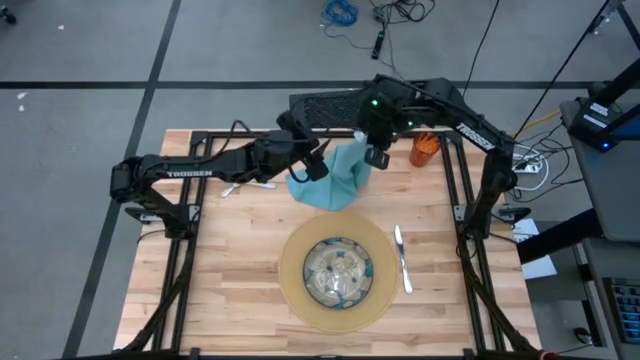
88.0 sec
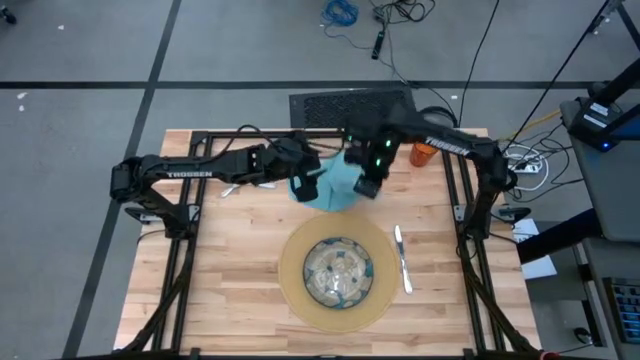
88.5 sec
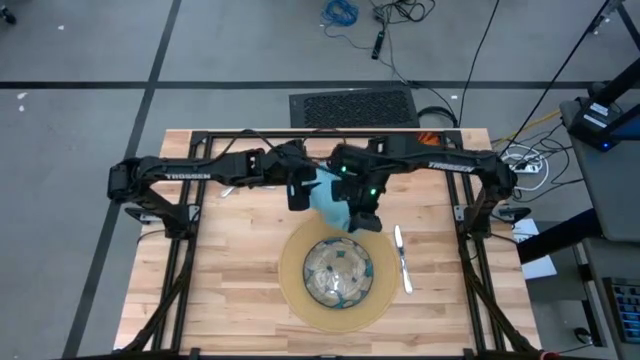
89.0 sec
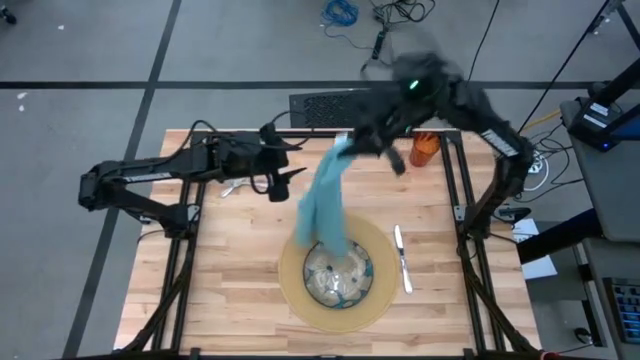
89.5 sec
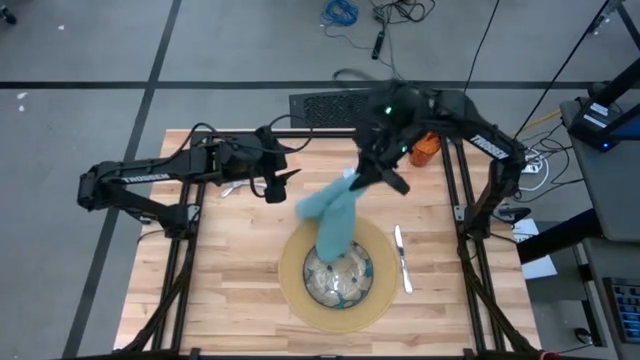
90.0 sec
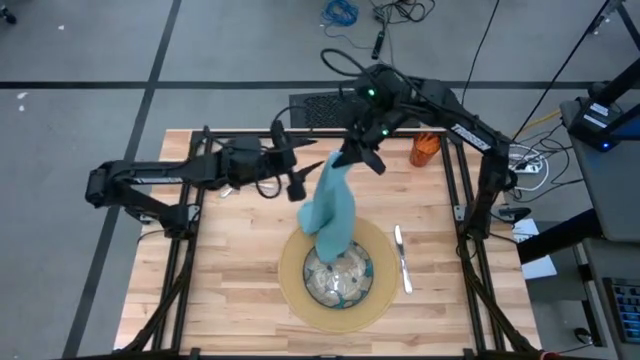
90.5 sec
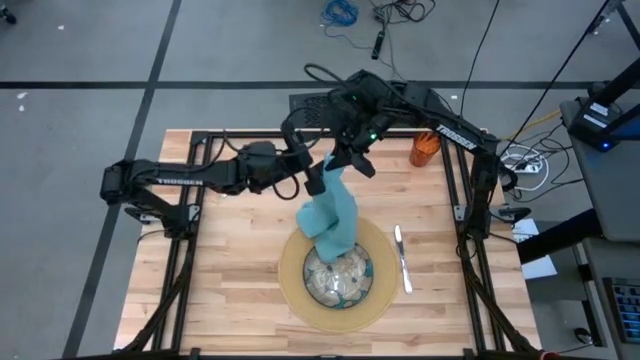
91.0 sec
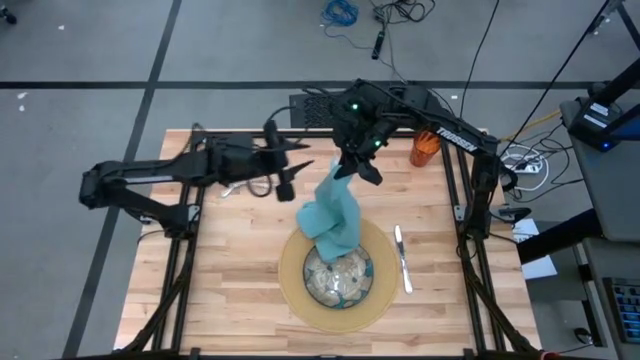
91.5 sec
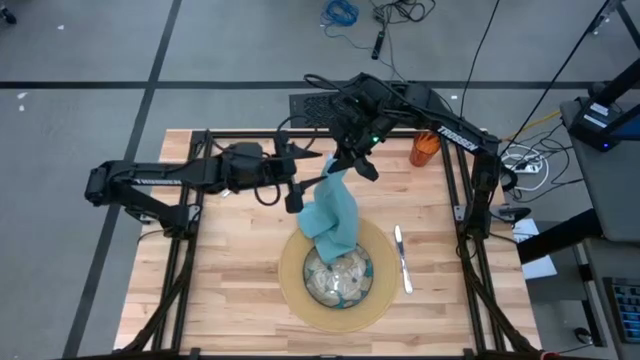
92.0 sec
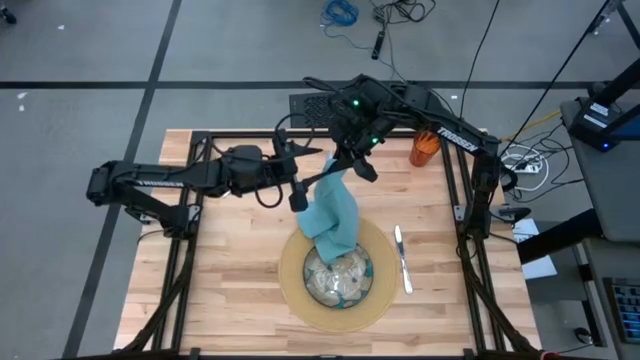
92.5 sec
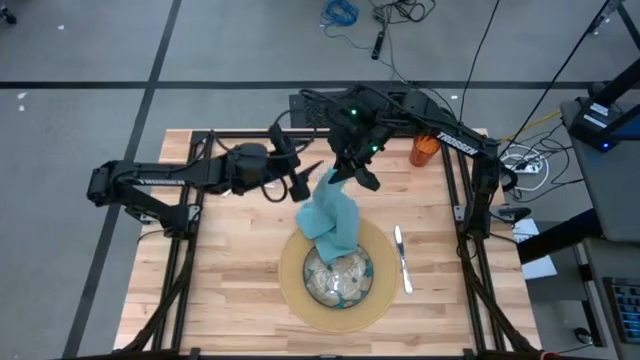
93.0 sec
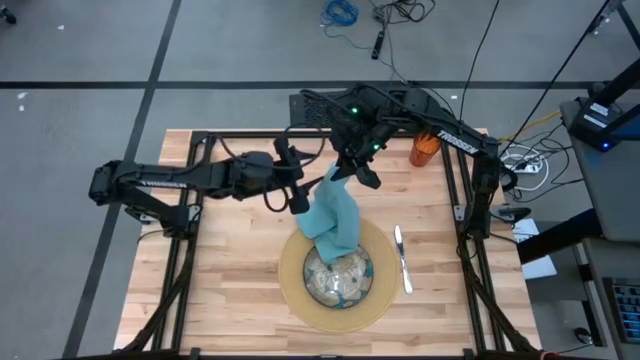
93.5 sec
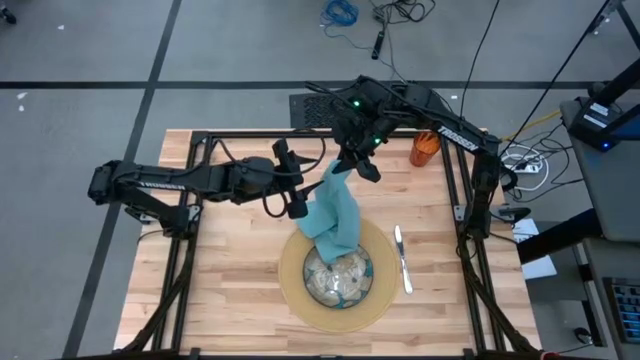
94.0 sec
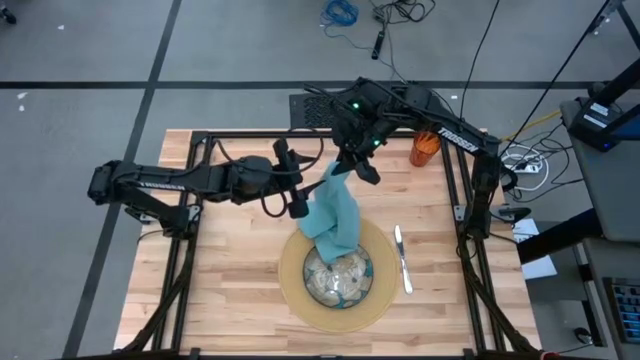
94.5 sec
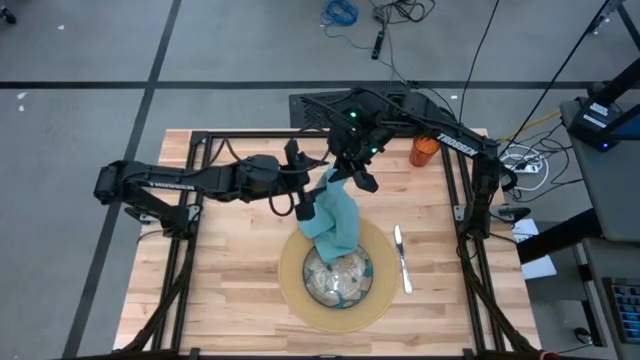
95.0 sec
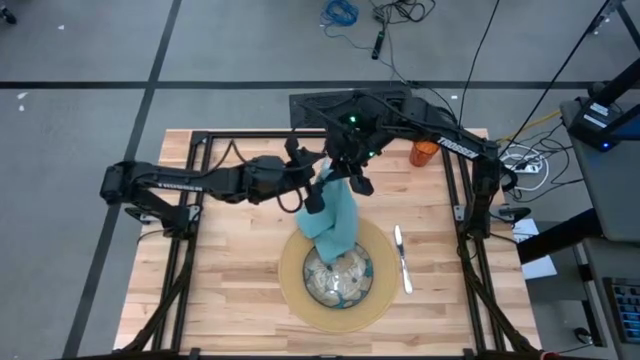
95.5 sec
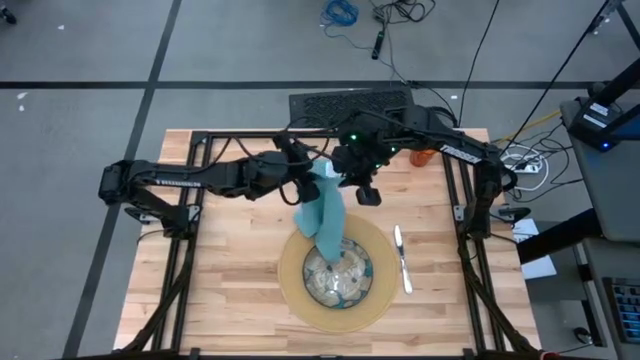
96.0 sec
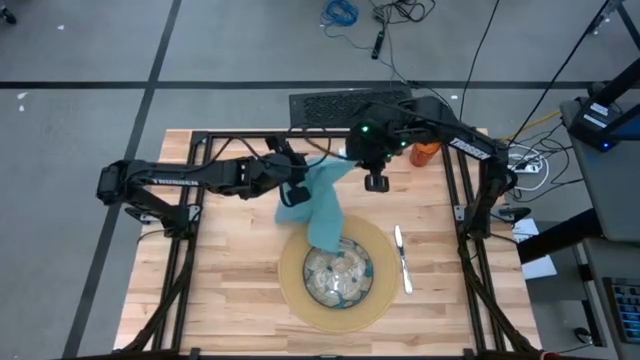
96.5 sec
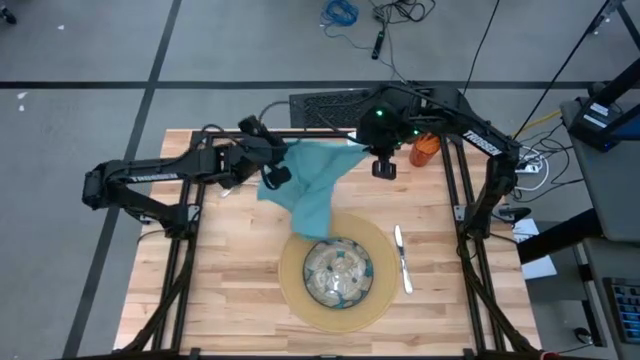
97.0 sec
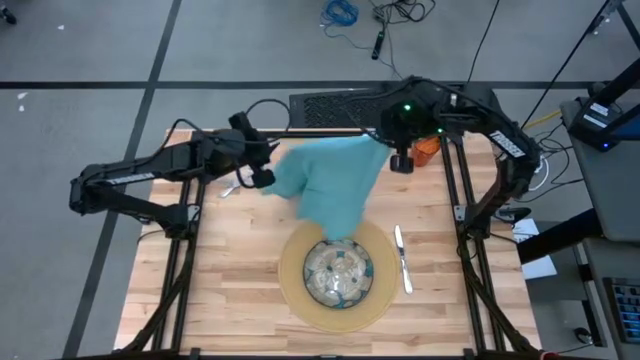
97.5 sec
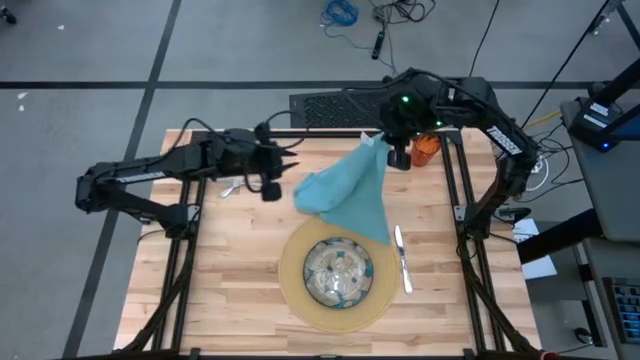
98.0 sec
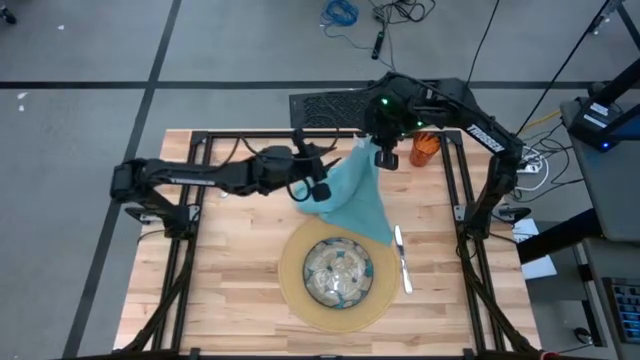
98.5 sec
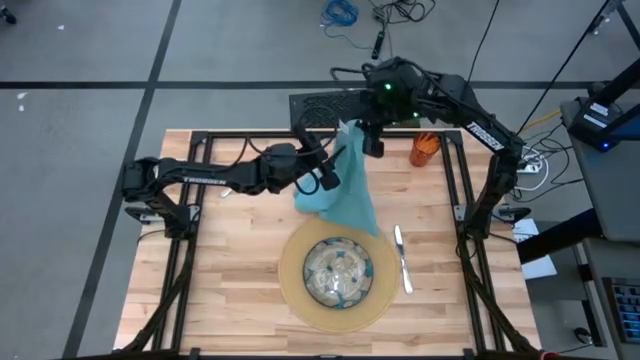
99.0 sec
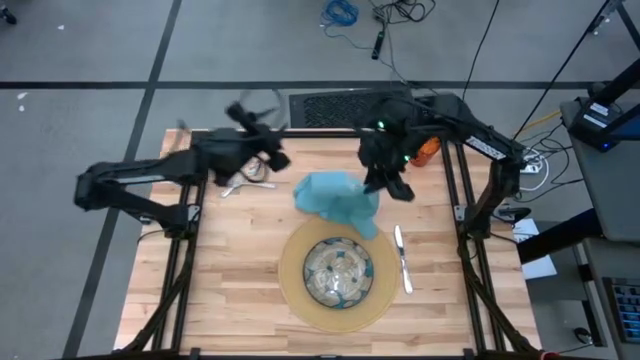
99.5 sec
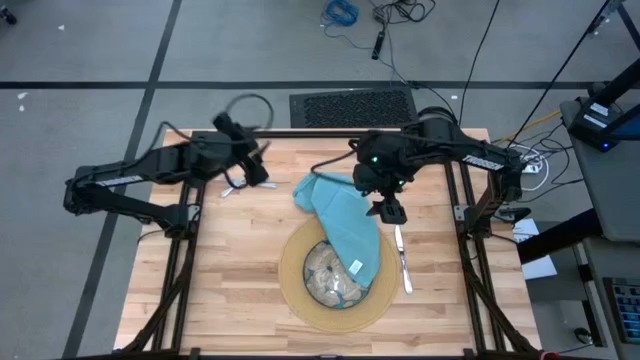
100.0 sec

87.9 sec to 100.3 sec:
Task: Set table place
Fold the blue napkin

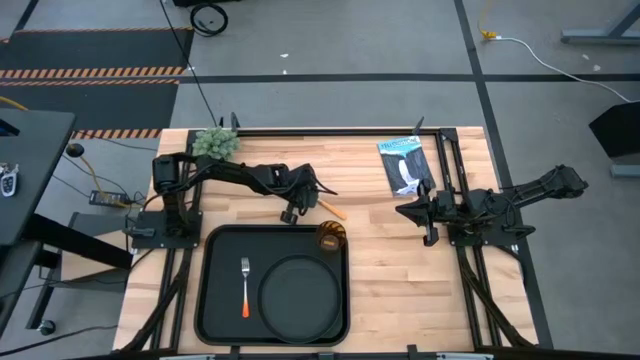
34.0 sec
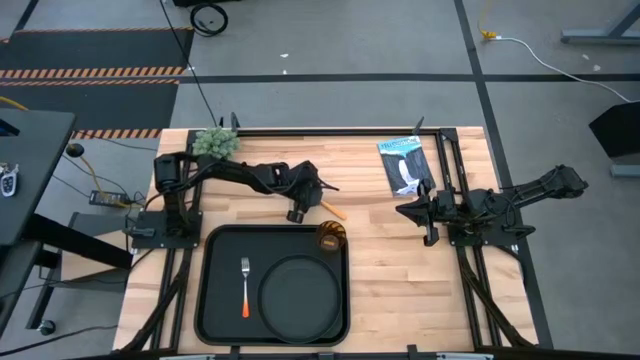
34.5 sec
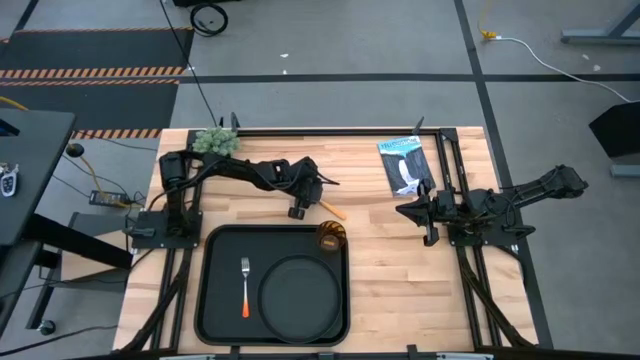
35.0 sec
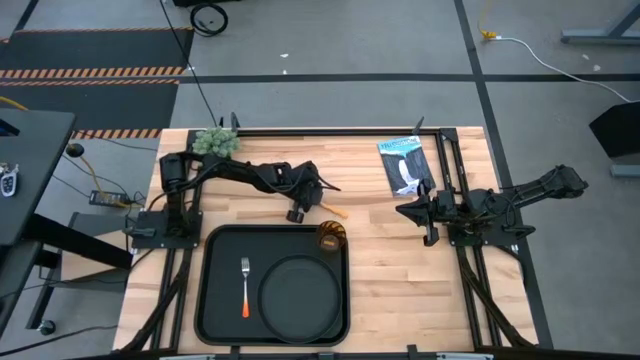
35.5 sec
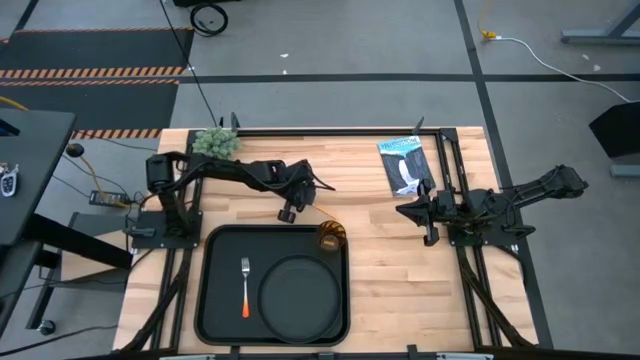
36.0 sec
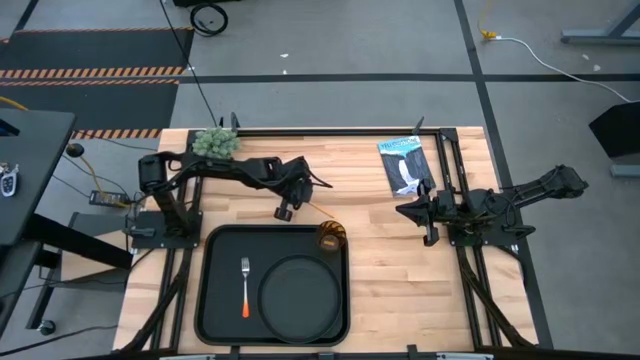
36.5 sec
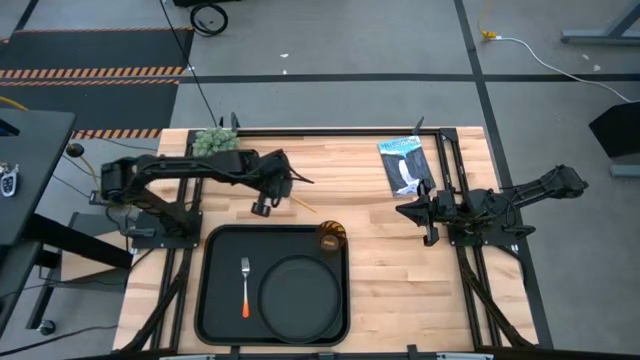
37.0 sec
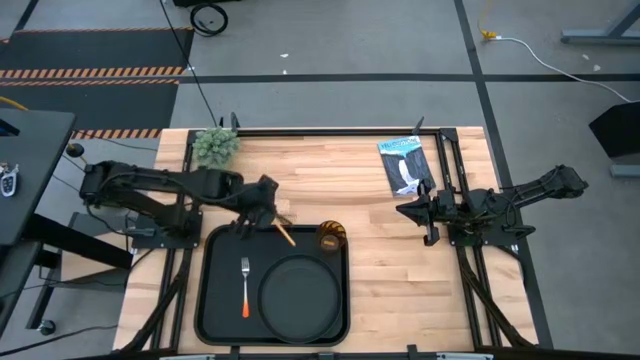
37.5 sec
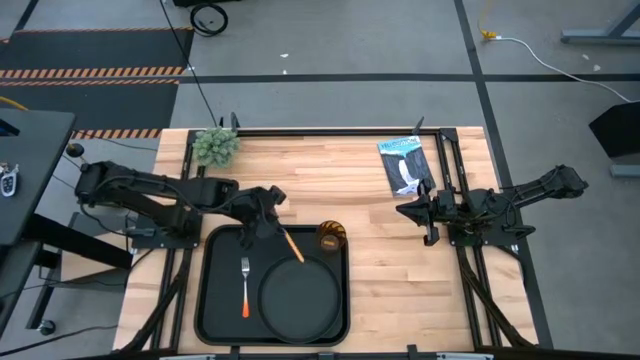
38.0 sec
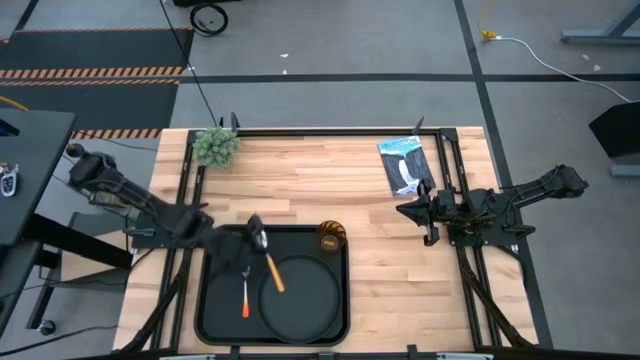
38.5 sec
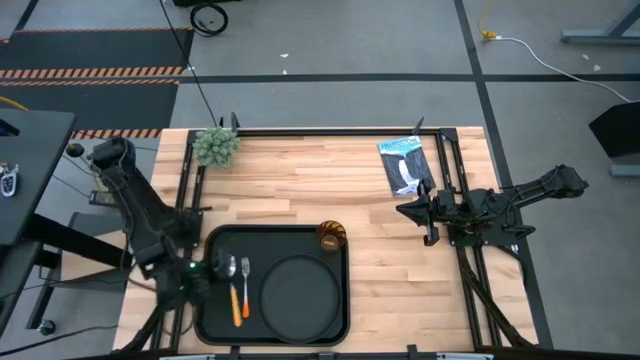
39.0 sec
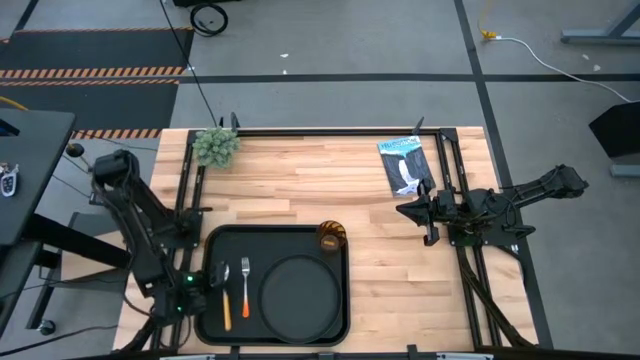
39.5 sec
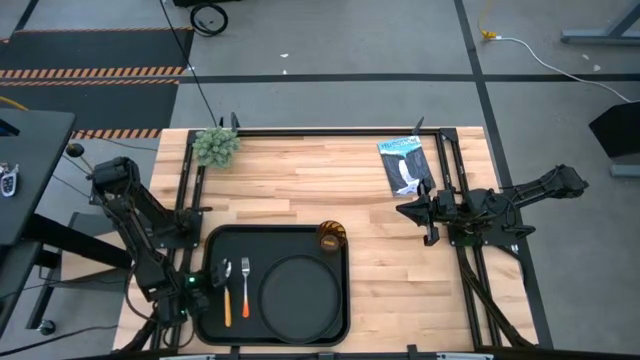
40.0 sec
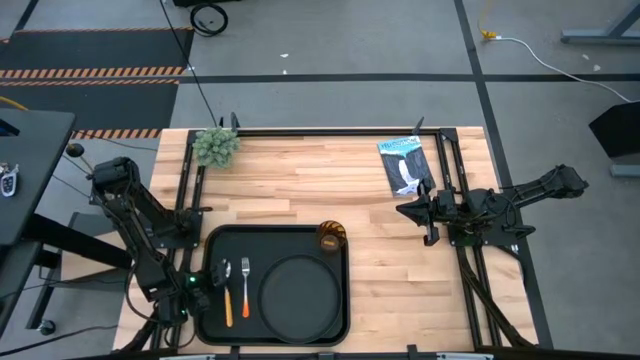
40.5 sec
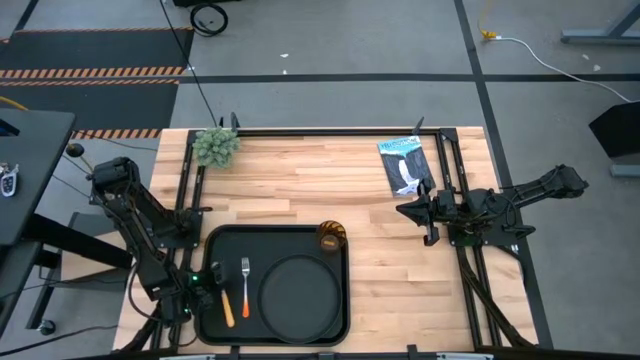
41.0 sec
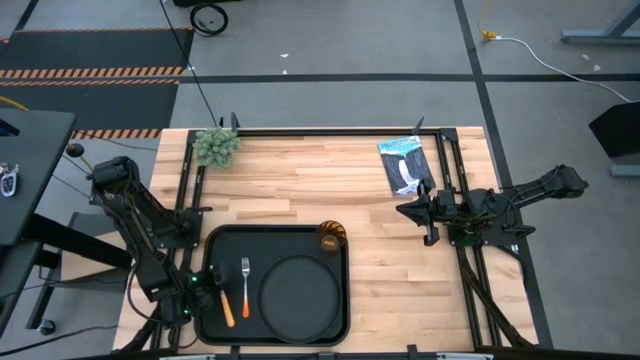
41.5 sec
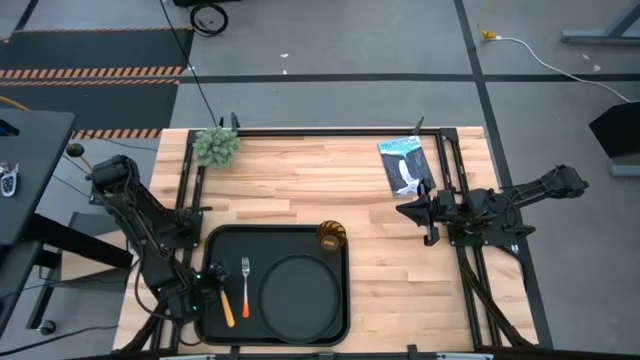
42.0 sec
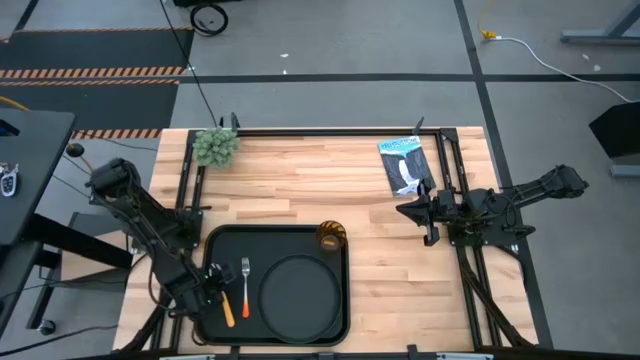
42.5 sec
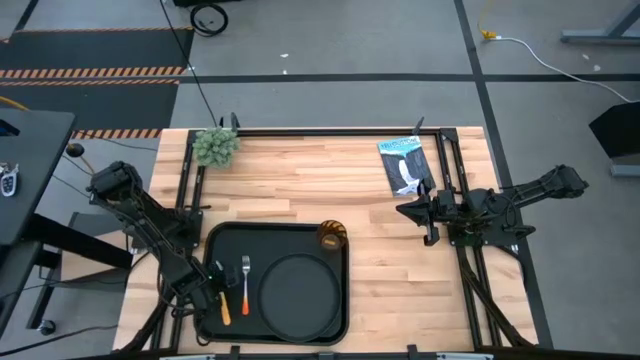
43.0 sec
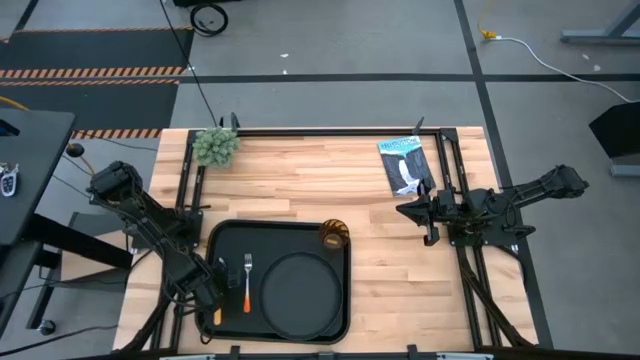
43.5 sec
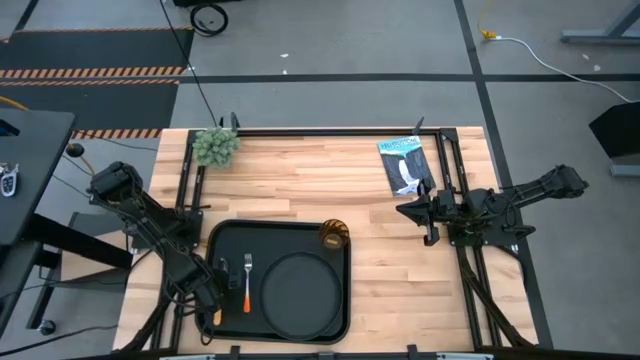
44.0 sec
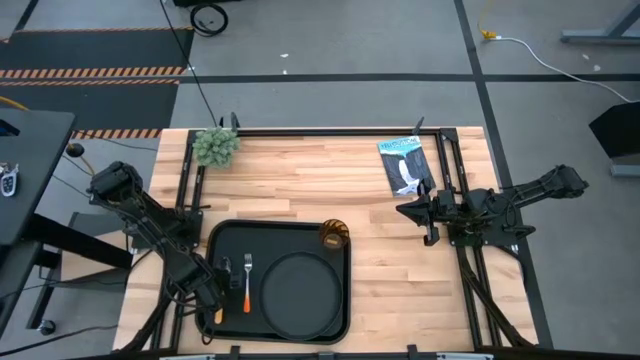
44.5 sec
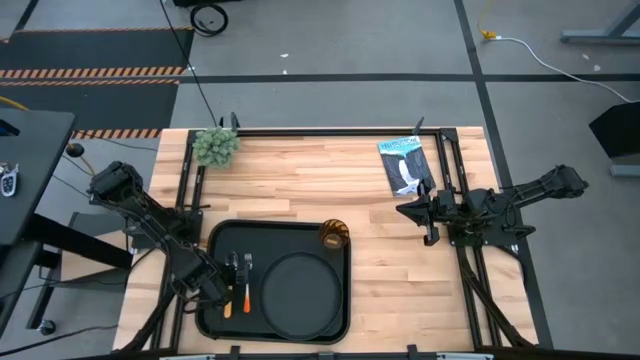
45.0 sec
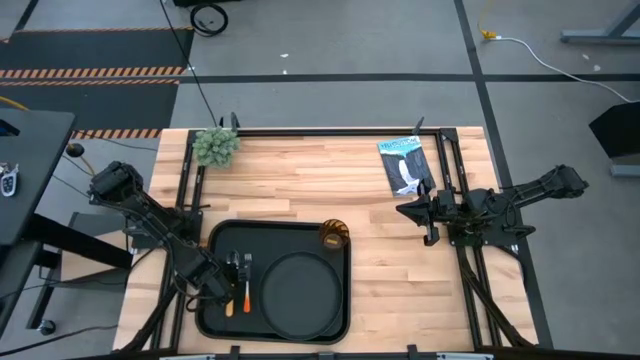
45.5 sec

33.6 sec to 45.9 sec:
Task: Pick and place plate/cup/fork/spoon on tray
Put the yellow spoon on the black tray on the left of the orange fork
